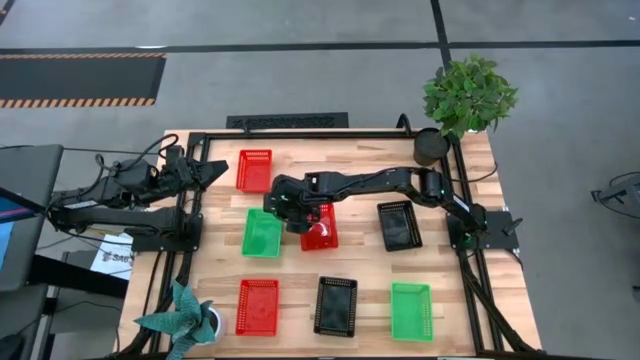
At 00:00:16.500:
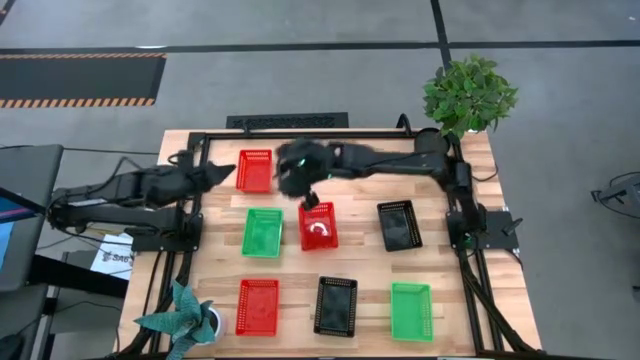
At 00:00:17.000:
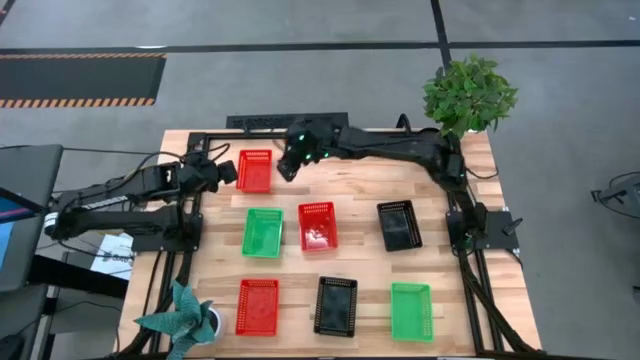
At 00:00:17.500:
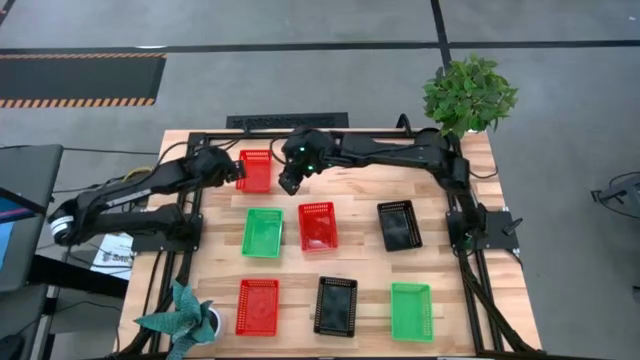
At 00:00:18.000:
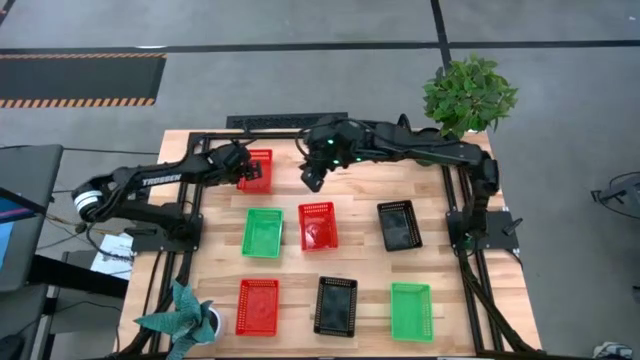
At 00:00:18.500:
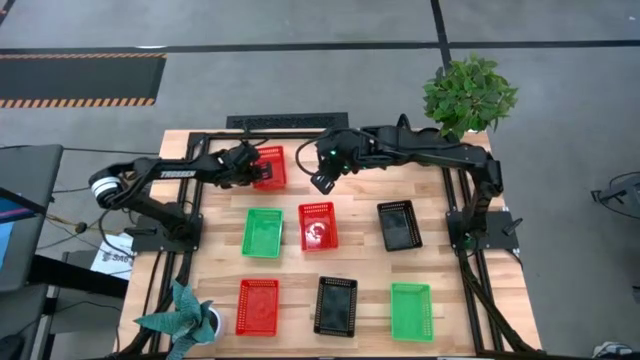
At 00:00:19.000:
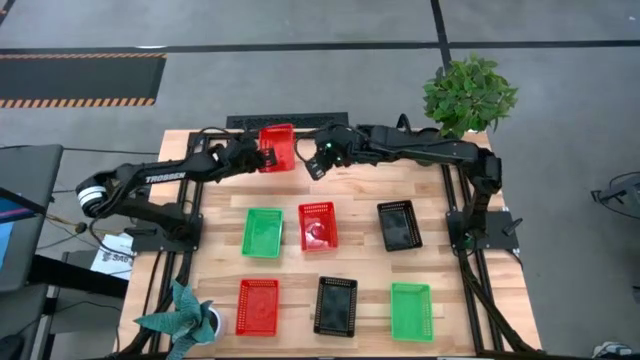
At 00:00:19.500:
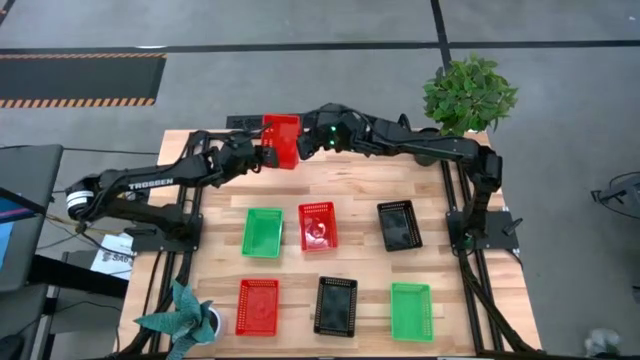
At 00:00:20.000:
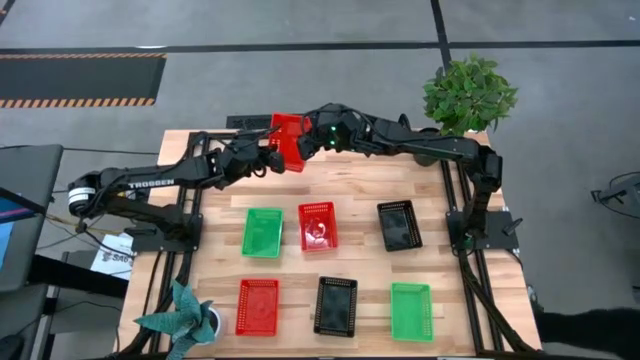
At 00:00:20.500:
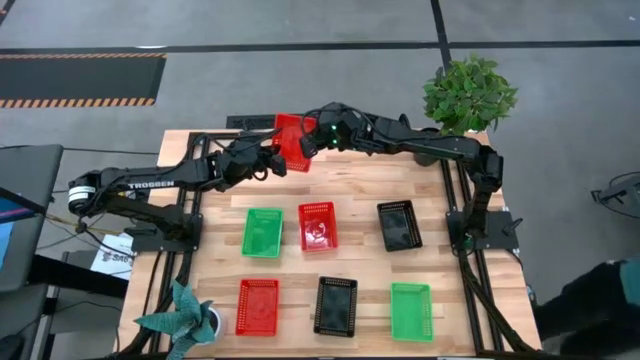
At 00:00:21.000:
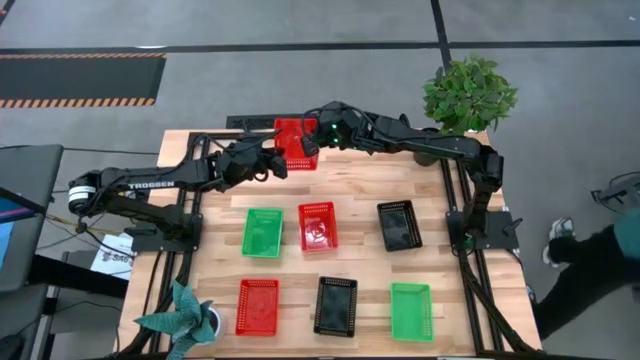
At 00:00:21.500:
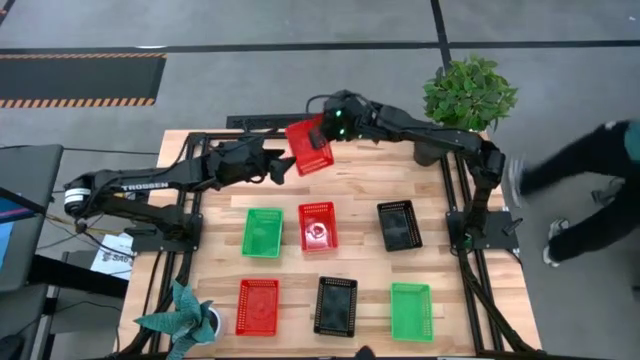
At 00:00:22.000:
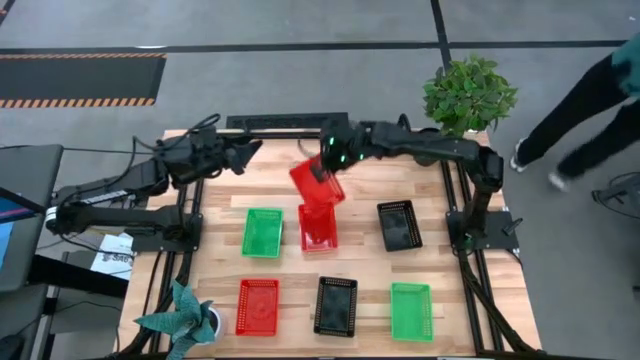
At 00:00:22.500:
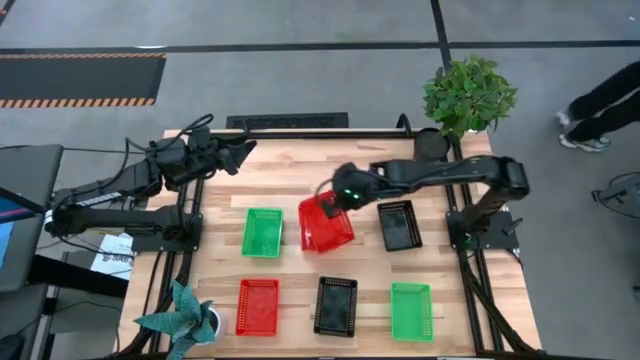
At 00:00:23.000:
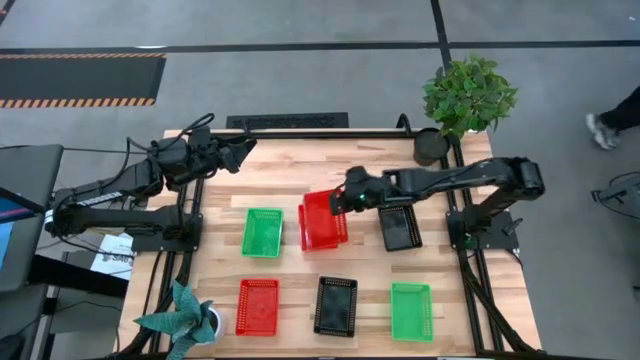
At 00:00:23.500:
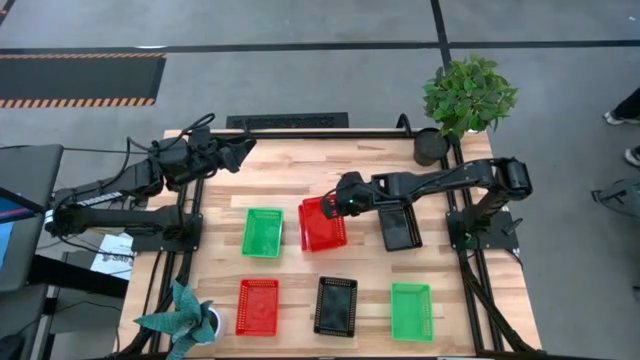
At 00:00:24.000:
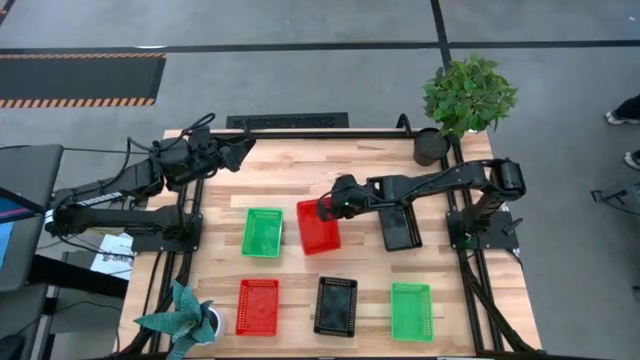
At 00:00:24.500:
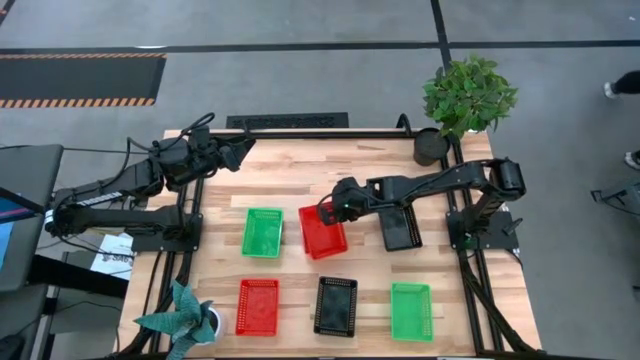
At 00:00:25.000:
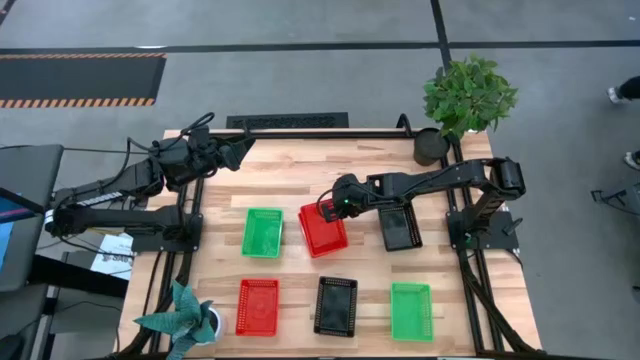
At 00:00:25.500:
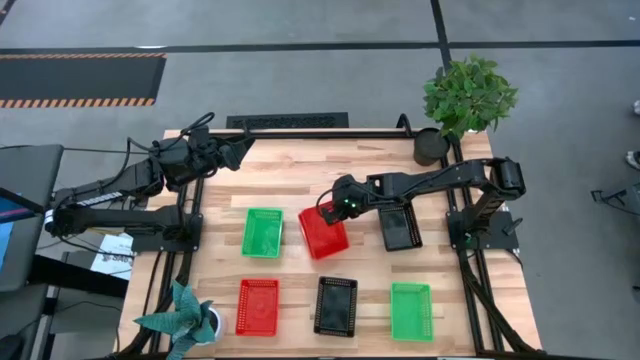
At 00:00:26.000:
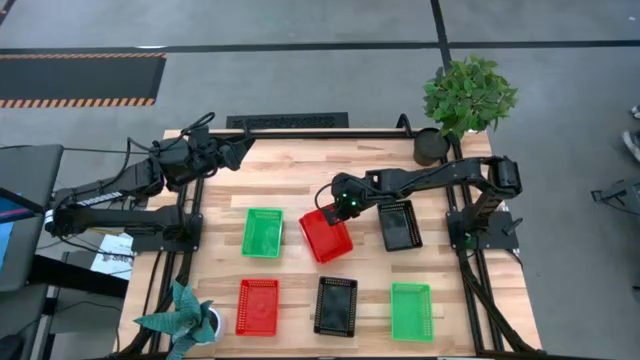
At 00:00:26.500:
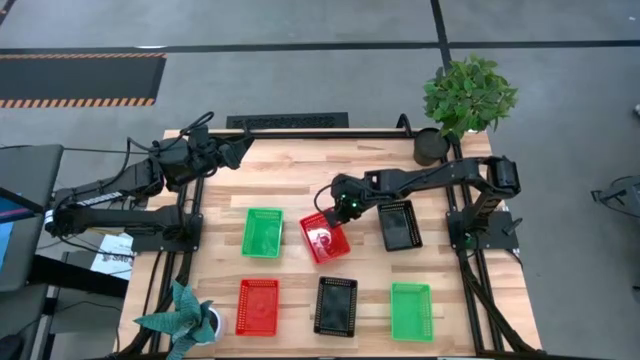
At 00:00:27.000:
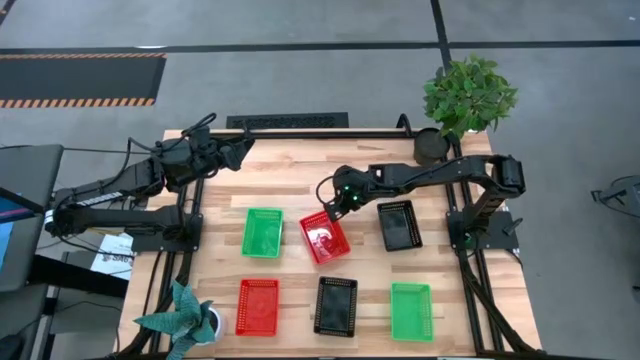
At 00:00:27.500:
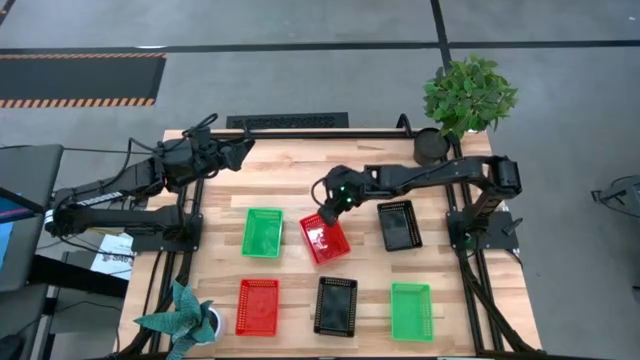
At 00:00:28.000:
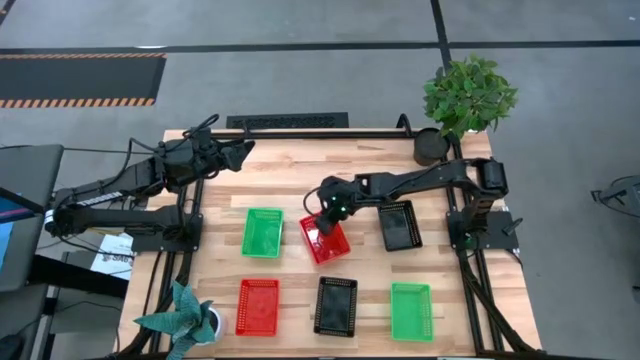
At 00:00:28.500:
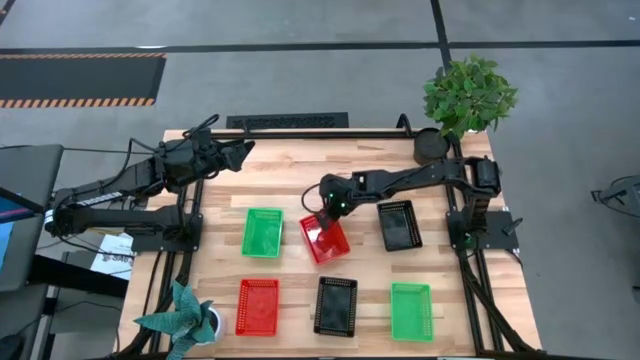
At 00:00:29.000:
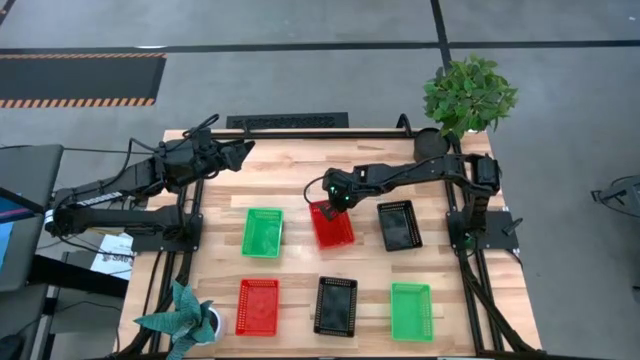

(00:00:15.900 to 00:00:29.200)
Stack the top red bin on top of the middle red bin

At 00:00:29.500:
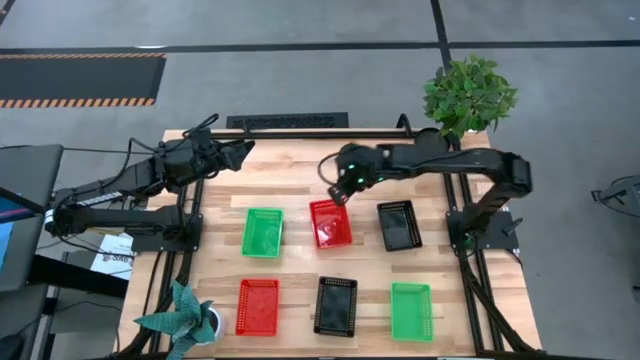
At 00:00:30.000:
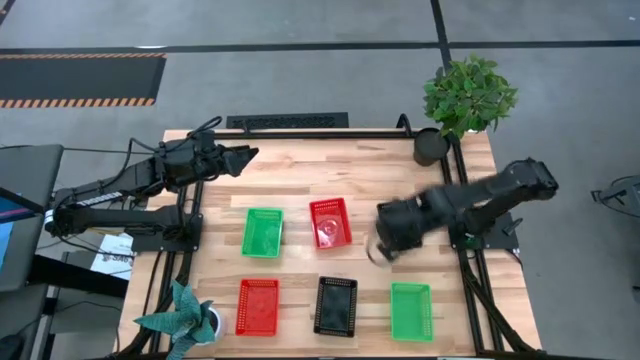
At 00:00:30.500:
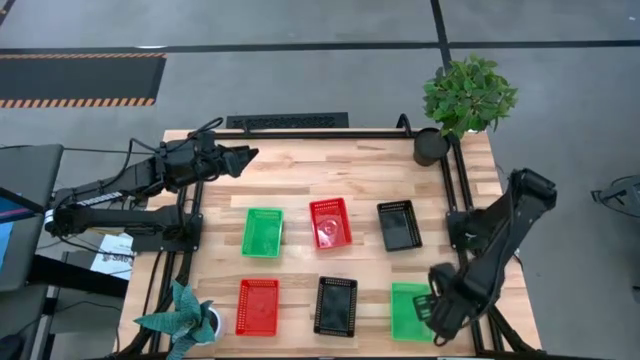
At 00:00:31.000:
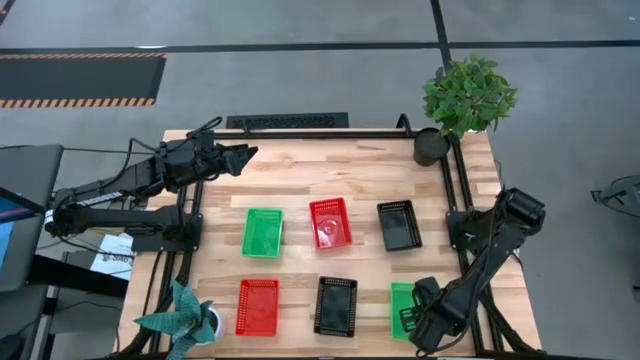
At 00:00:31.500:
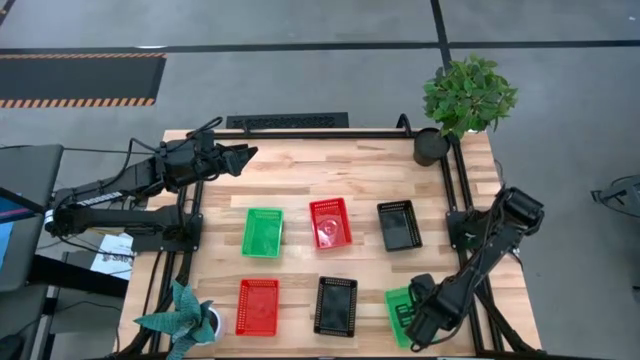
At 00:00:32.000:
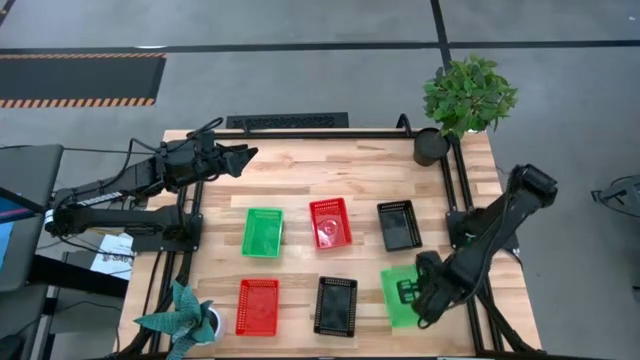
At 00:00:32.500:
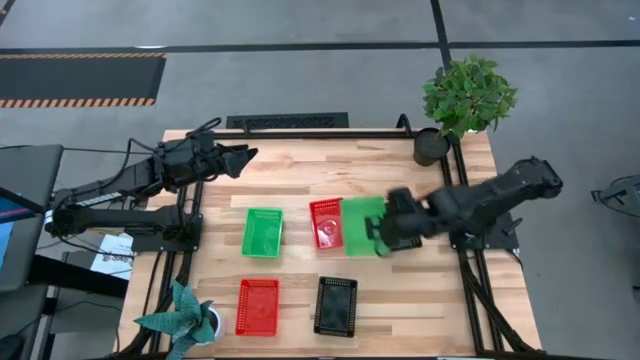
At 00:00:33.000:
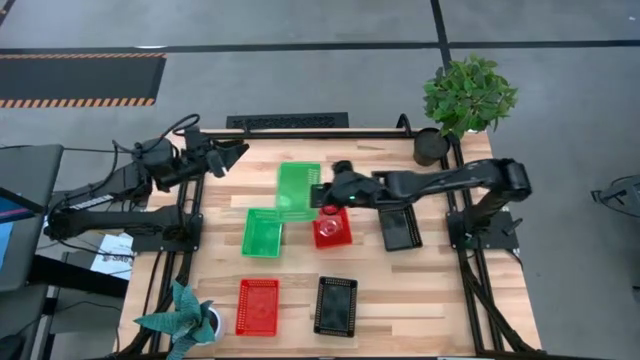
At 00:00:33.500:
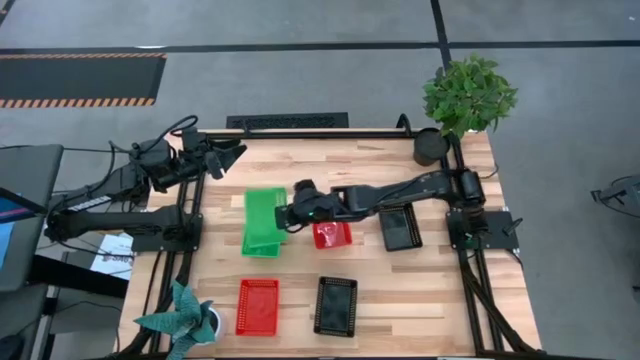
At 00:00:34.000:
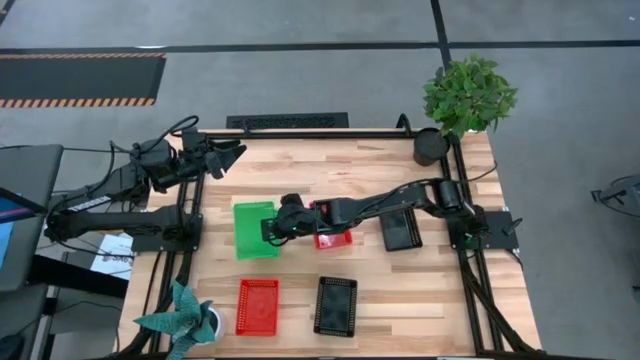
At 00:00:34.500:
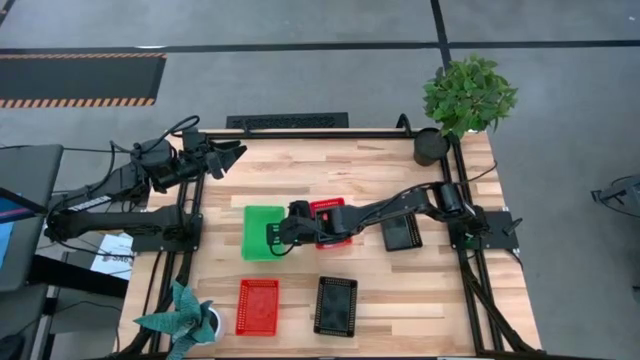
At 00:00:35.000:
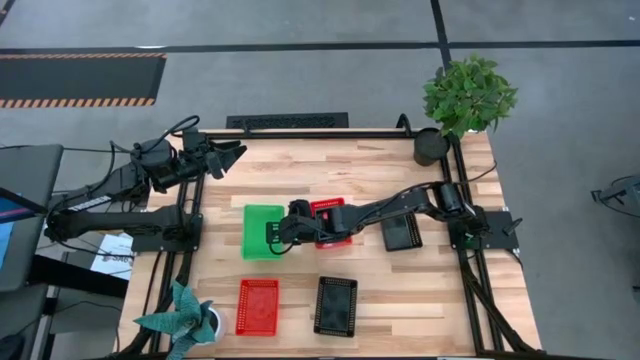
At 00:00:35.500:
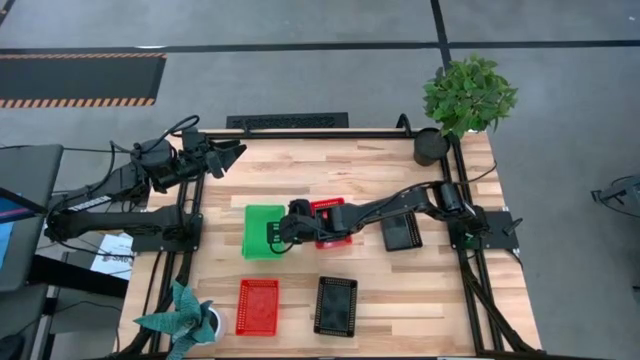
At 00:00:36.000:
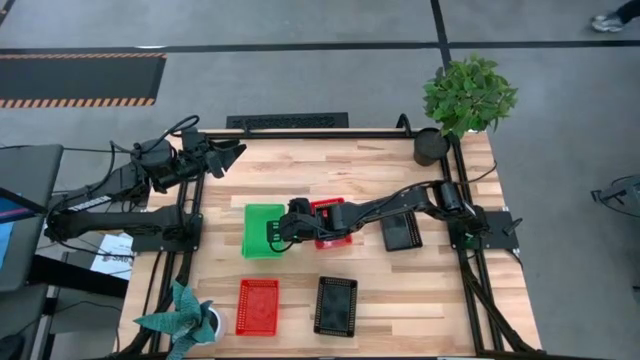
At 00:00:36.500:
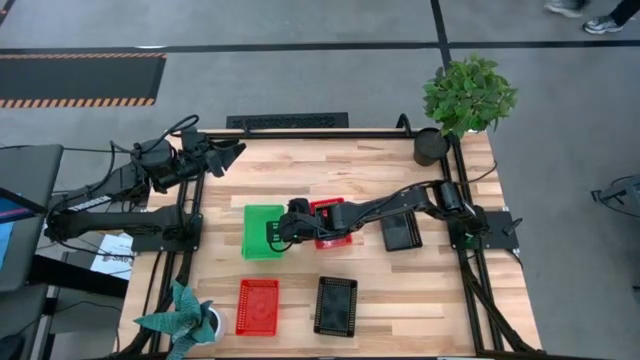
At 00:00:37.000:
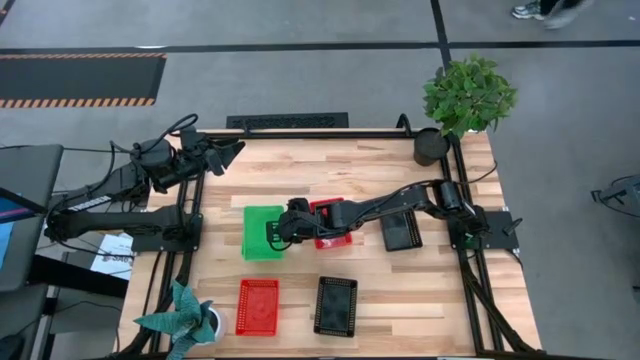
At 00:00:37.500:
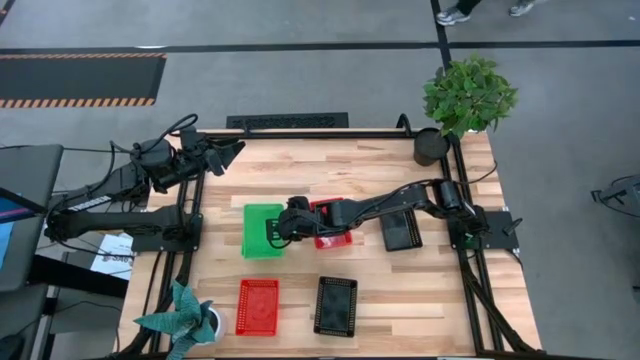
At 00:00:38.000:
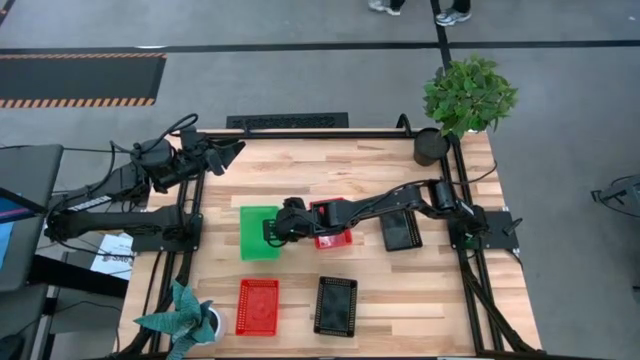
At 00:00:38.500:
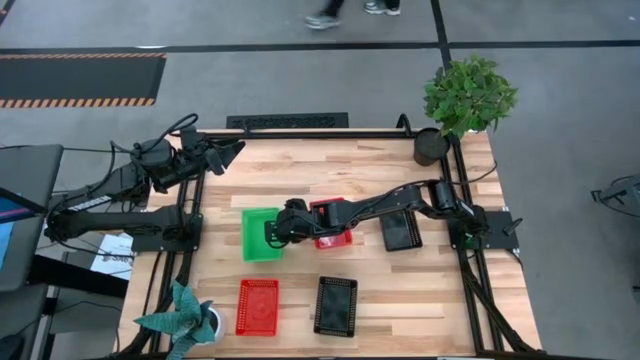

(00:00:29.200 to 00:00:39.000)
Stack the bottom green bin on top of the top green bin
